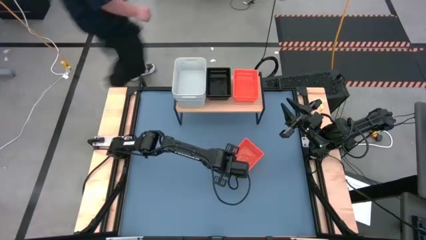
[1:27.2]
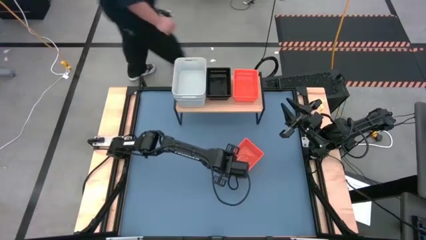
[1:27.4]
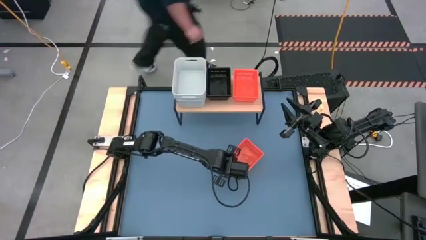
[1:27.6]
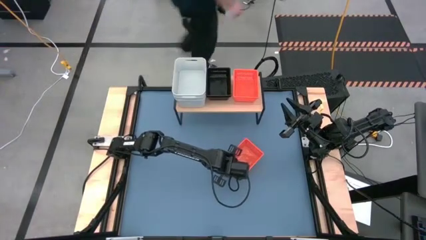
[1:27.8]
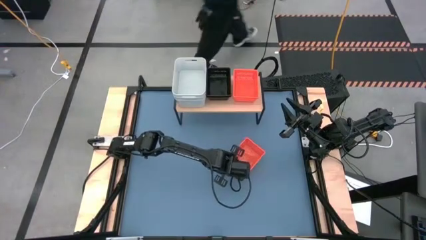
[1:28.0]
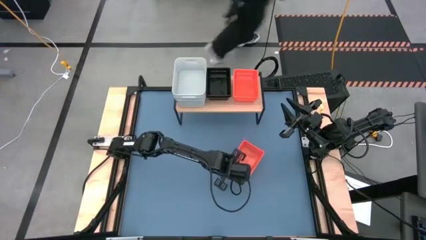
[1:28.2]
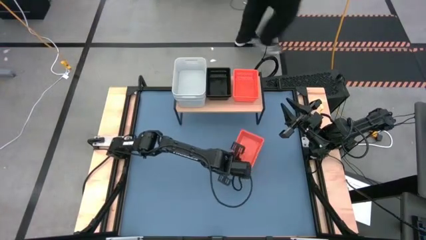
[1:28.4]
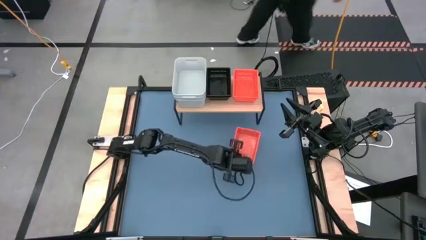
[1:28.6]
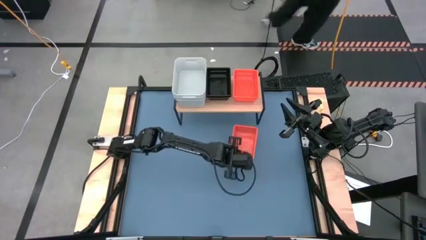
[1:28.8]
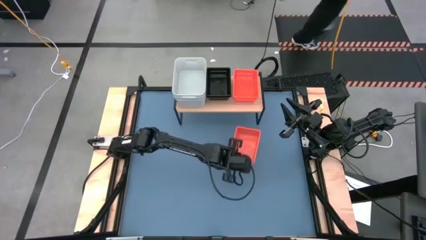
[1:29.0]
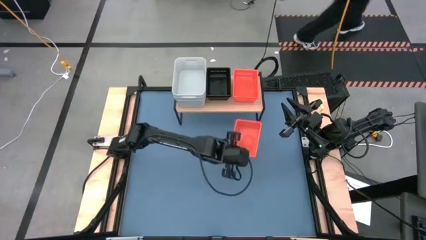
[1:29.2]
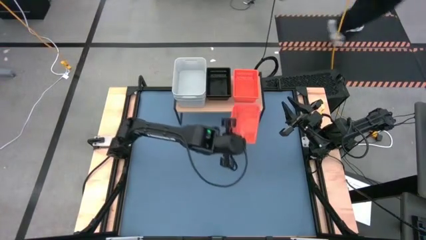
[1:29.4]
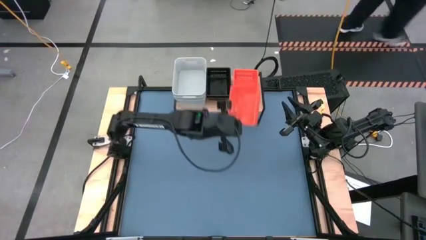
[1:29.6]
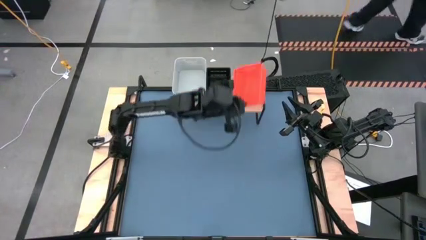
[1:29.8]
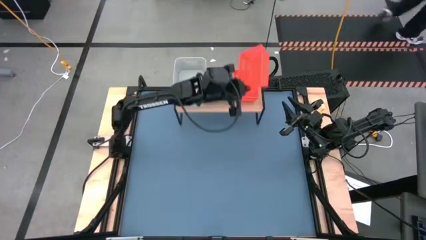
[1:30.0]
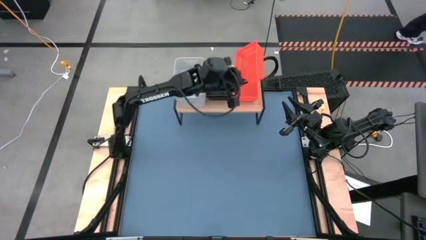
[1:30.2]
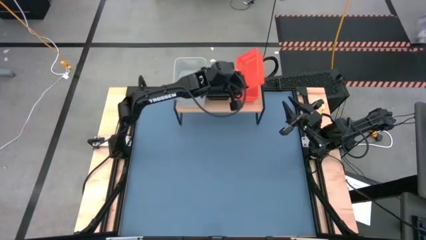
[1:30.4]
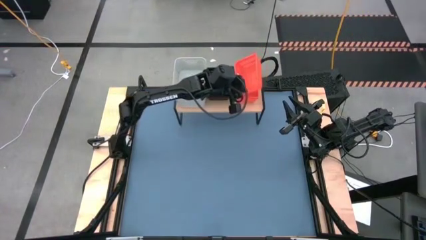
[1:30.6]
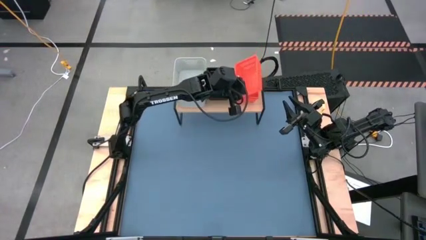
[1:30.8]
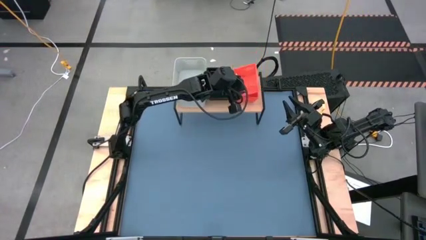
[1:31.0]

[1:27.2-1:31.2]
Task: Stack baskets on shelf by color
Stack the orange bin on top of the other orange bins on the shelf

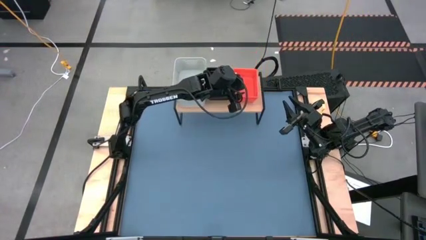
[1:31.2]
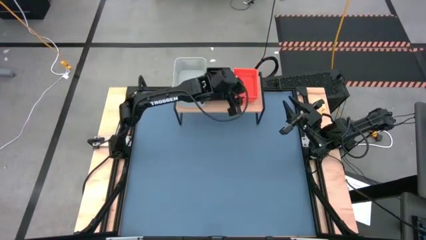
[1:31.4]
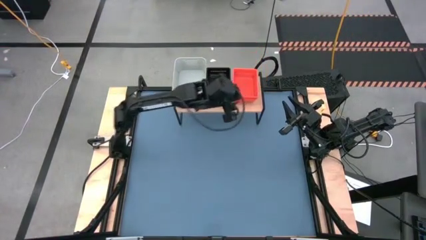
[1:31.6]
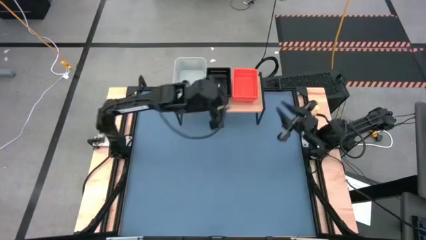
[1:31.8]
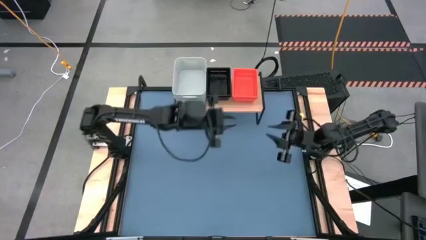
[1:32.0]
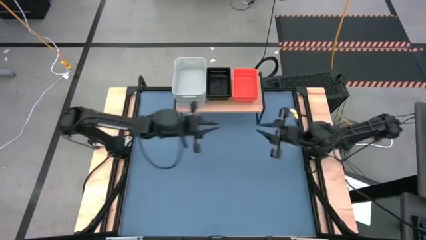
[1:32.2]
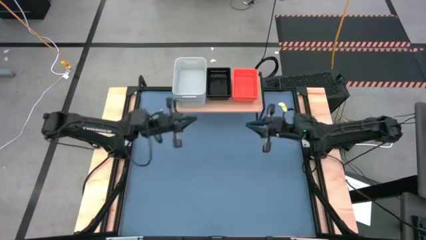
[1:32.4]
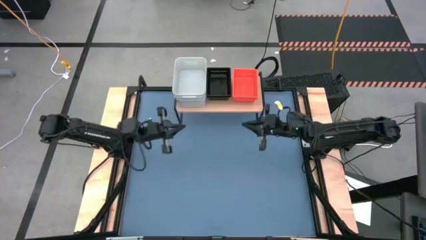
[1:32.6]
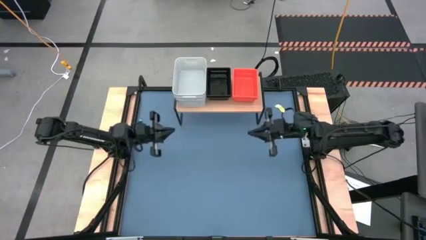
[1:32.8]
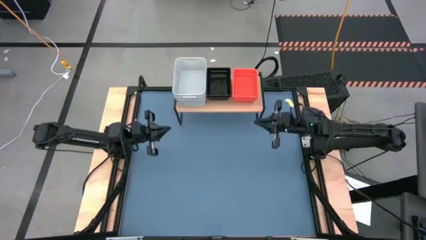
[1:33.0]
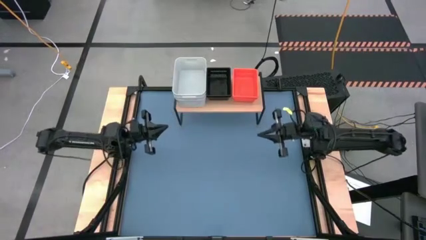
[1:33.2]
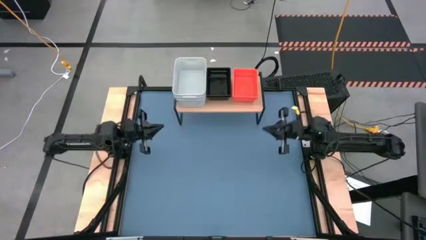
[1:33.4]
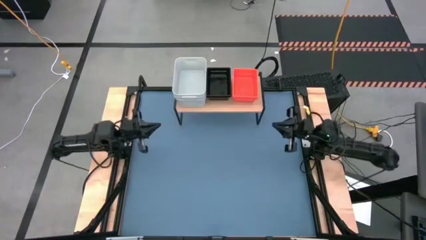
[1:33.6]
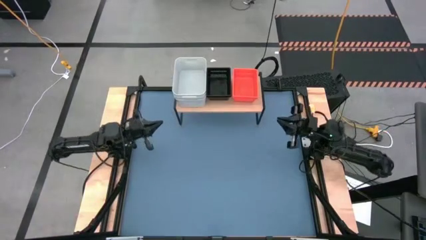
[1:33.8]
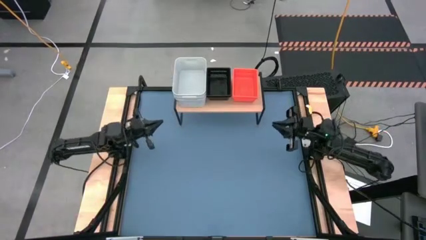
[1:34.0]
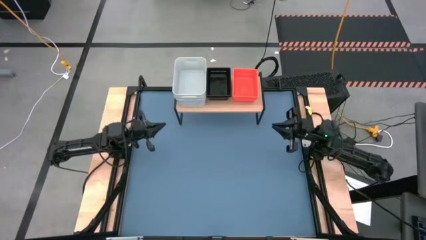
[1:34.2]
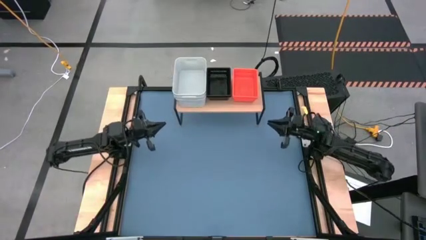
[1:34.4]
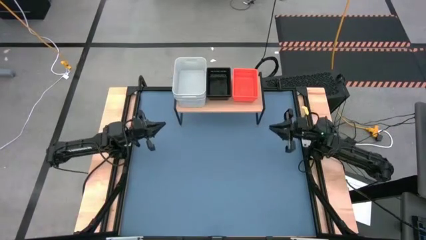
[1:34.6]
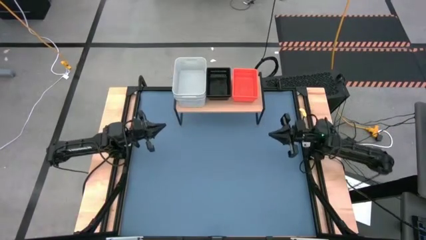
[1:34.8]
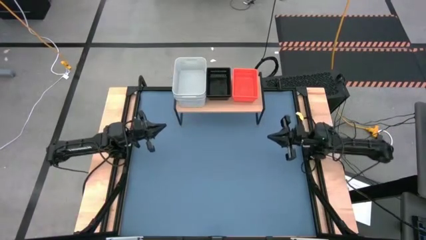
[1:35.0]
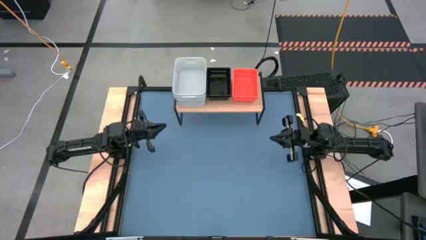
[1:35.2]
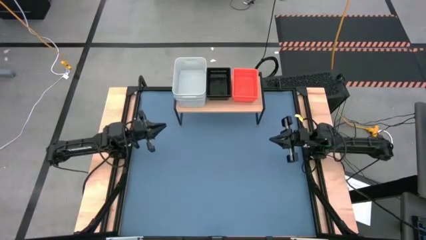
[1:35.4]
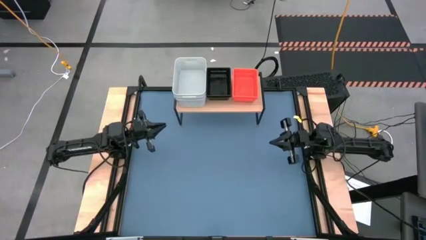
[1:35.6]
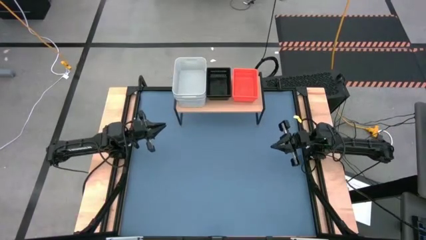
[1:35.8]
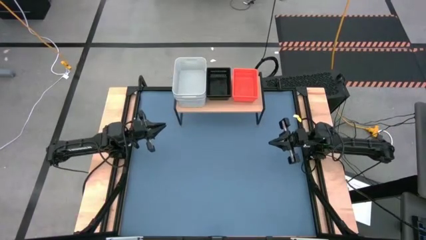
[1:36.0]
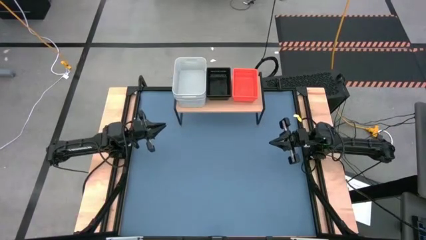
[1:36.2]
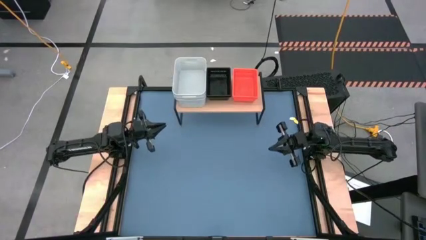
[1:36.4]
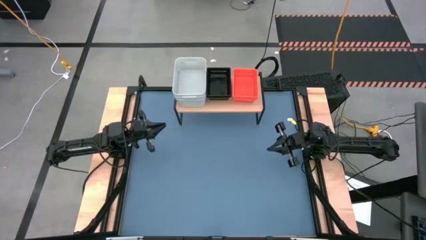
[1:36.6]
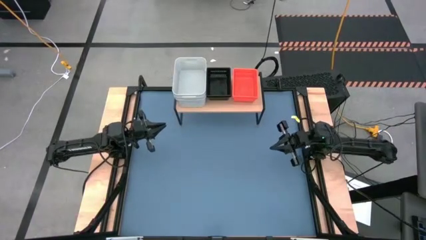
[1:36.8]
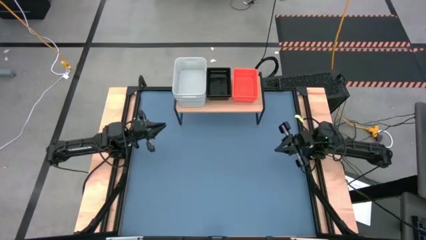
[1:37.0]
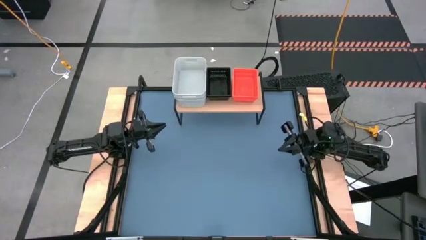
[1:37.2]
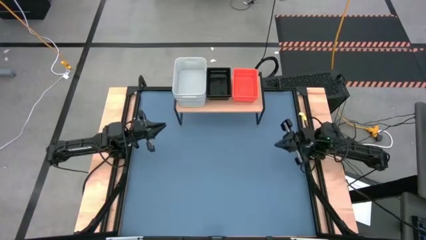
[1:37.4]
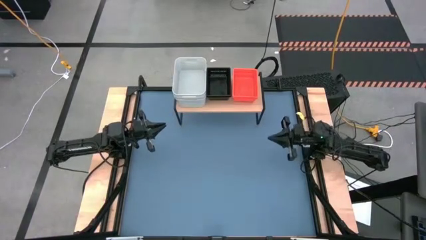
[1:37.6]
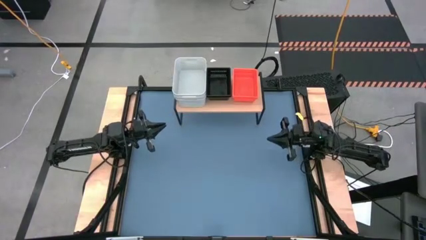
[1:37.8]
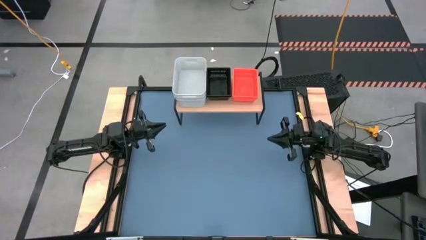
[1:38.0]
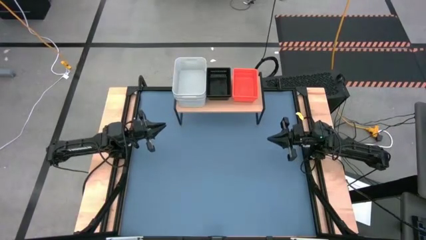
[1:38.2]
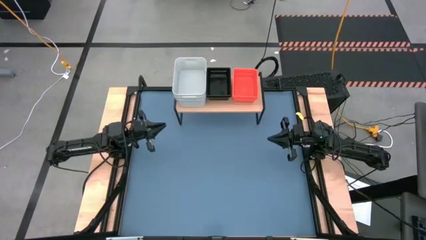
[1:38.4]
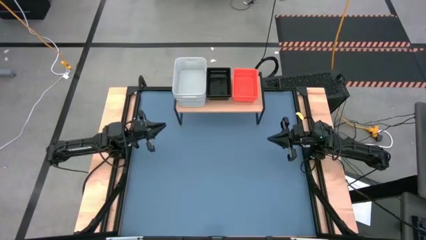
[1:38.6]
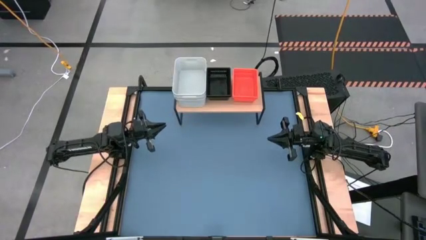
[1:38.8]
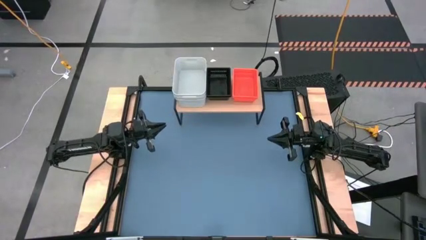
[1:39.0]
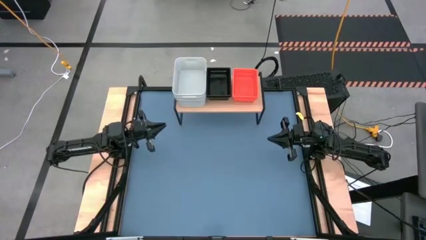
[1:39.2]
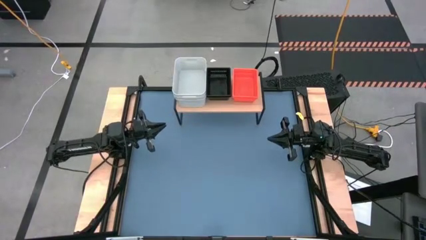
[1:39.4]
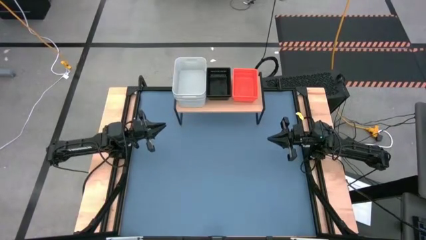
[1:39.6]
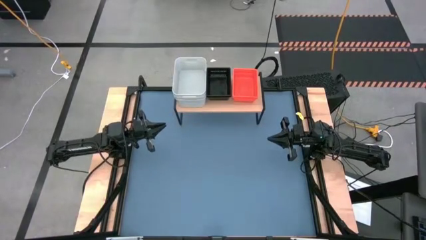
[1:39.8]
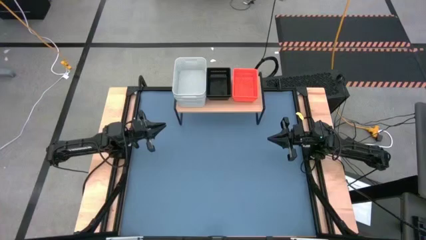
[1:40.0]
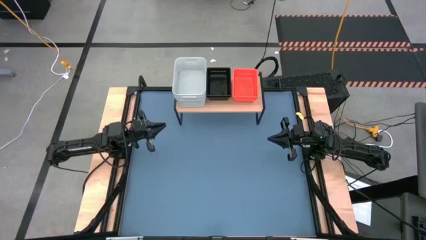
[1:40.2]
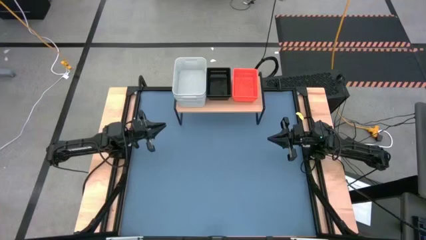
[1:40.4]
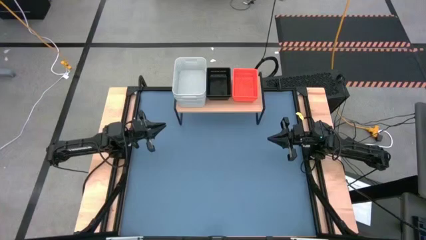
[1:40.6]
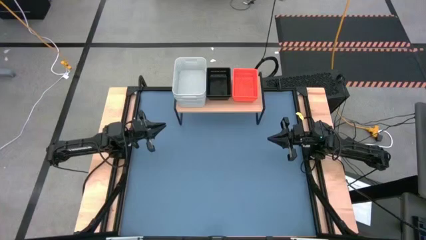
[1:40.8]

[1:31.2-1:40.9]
Return to Home Position

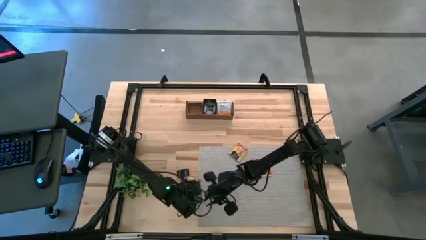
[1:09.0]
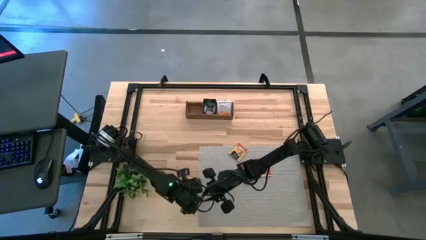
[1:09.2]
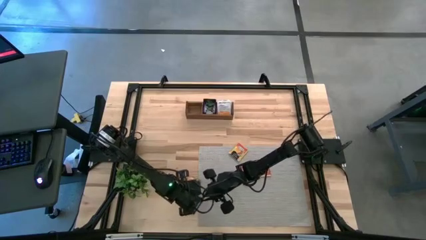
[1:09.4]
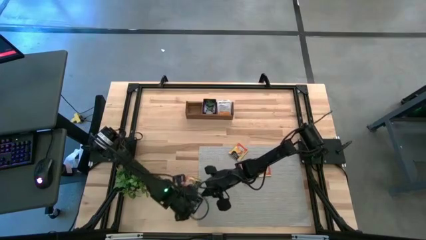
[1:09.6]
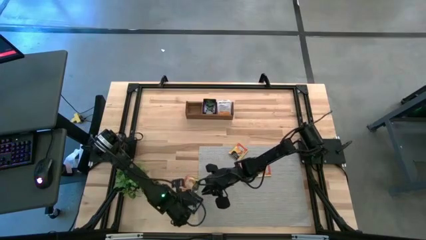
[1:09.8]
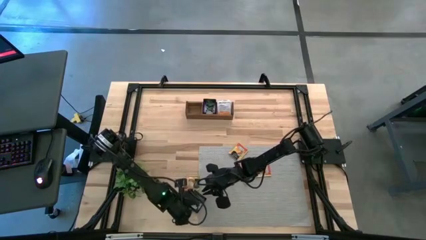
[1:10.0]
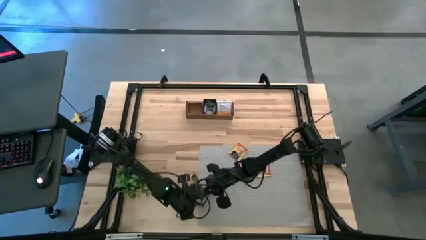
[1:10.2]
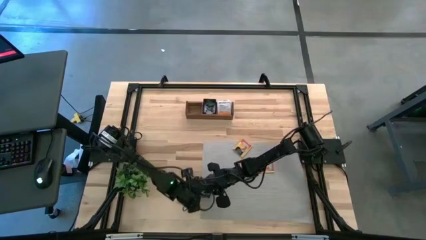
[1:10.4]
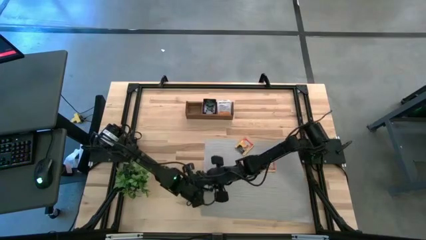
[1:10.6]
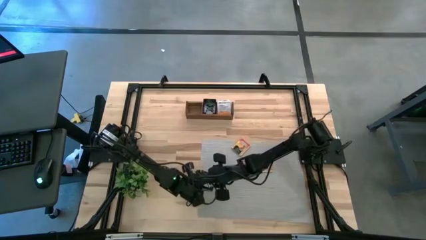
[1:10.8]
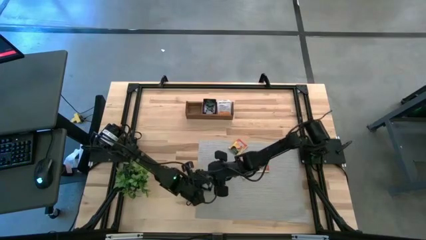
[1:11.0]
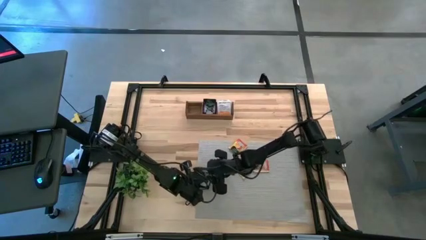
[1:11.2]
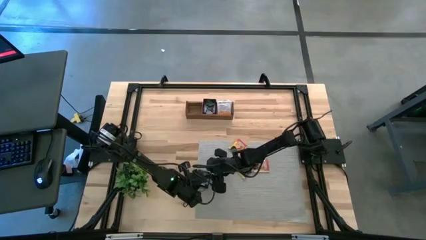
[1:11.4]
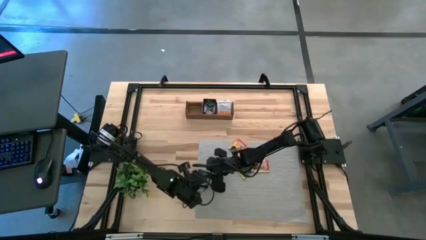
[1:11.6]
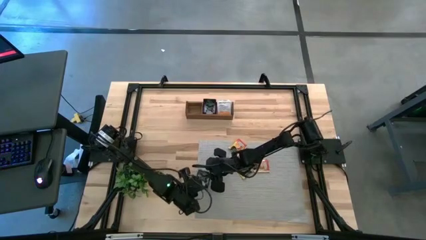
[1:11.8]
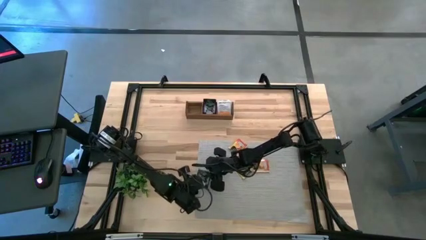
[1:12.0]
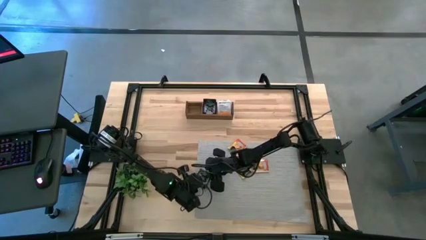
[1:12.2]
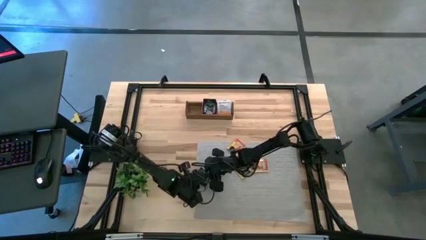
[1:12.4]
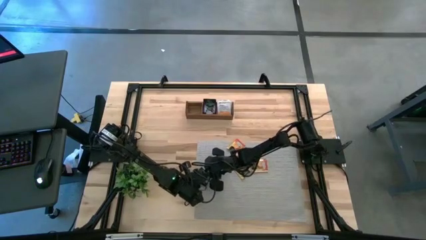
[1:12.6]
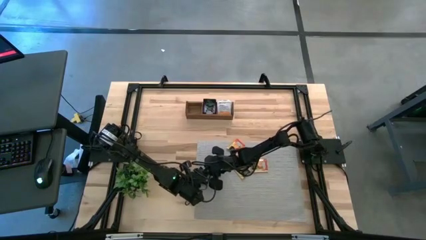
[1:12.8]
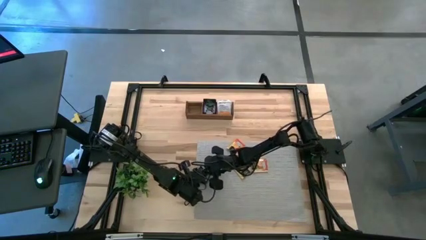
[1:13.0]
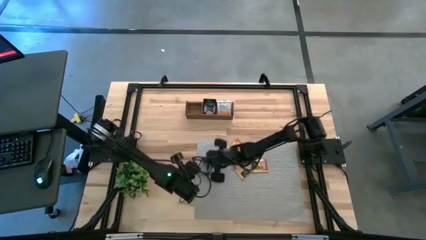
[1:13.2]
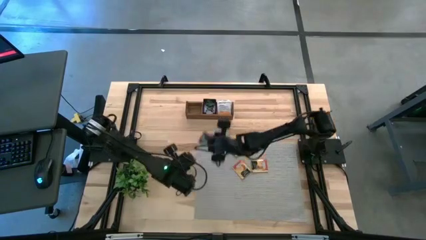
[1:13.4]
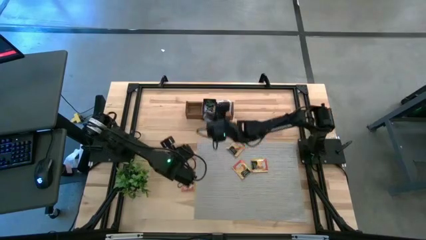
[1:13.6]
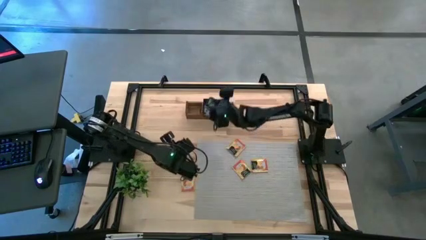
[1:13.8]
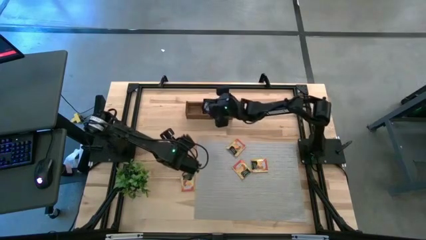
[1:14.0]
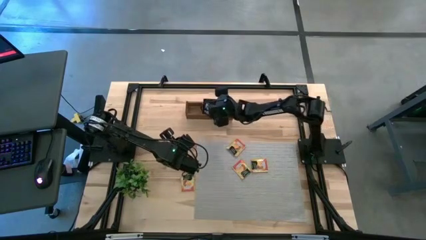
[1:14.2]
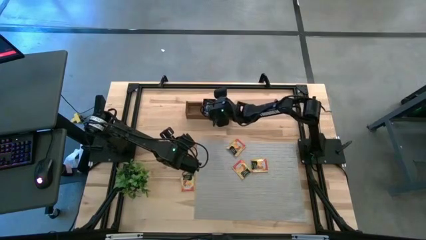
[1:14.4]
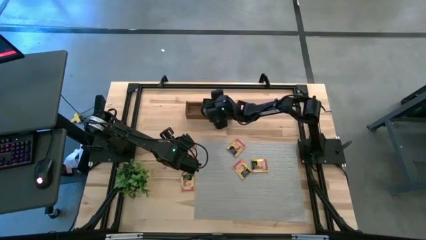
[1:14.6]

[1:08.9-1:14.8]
Task: Pick & Place Tea
Put the black tea bag into the middle section of the wooden organizer
